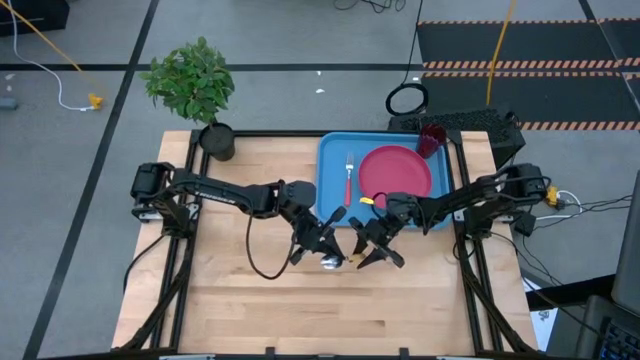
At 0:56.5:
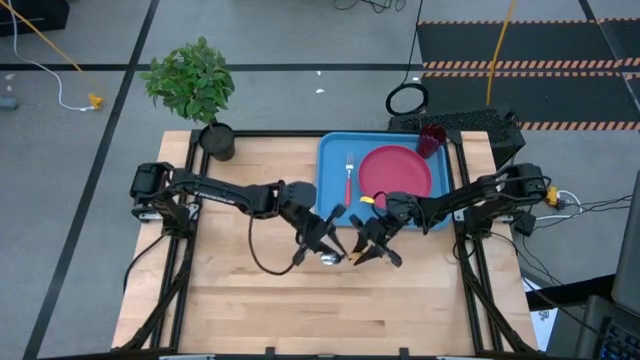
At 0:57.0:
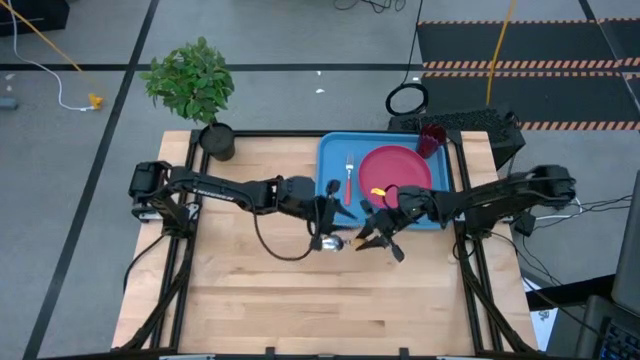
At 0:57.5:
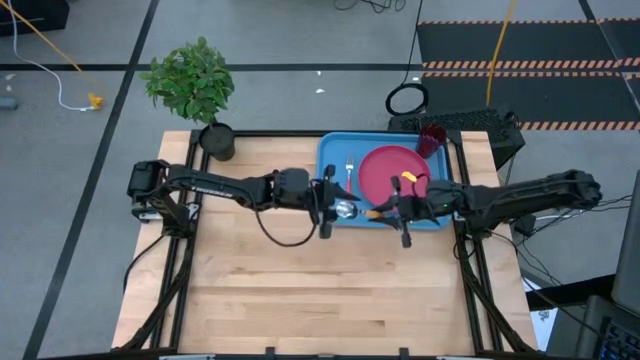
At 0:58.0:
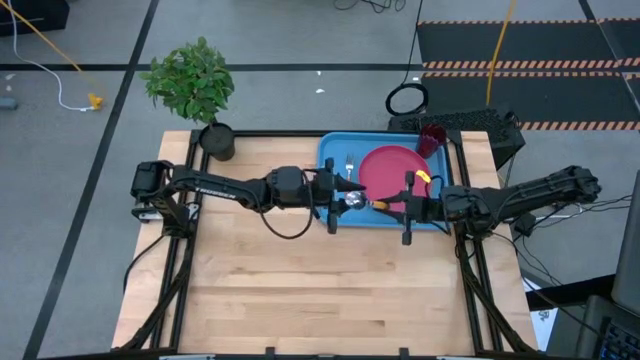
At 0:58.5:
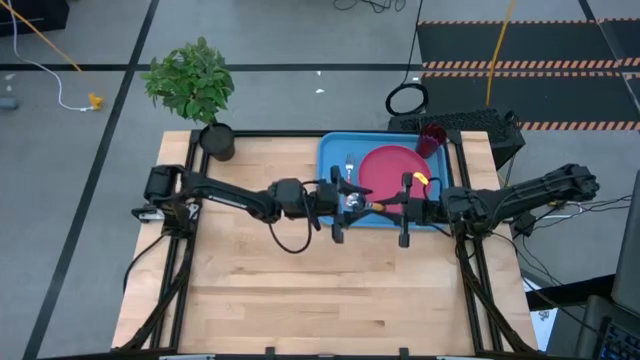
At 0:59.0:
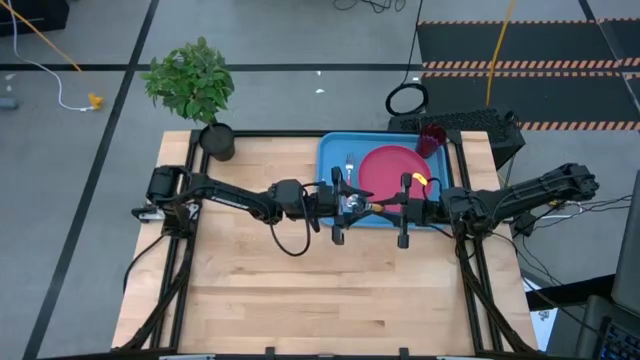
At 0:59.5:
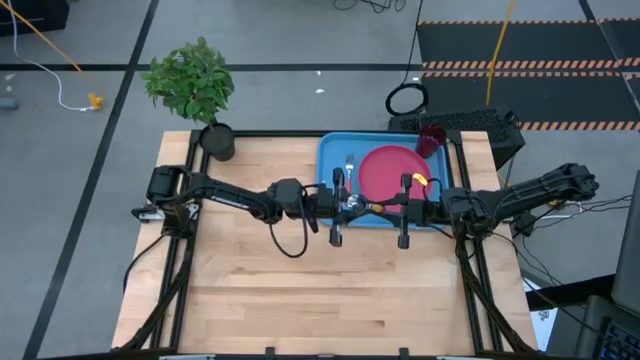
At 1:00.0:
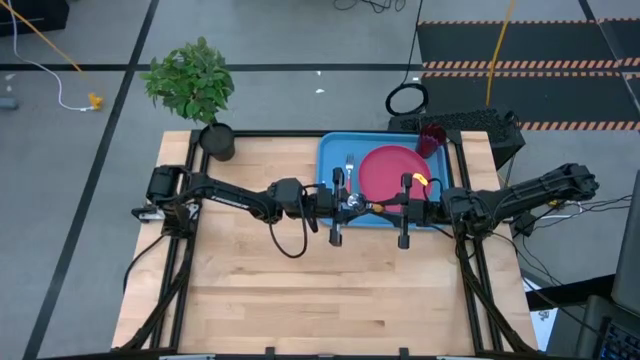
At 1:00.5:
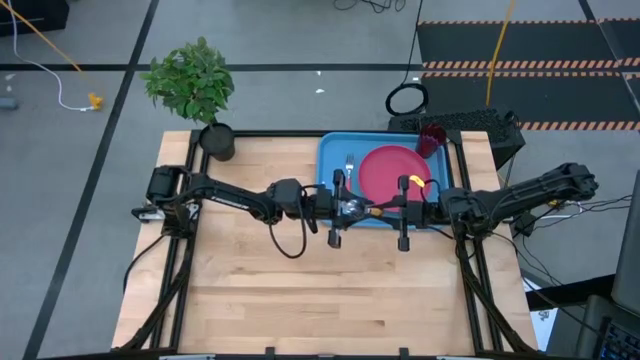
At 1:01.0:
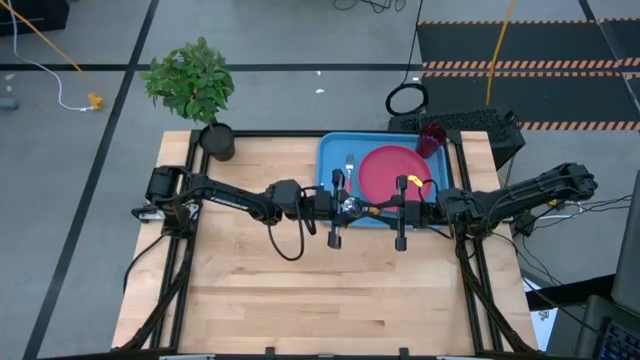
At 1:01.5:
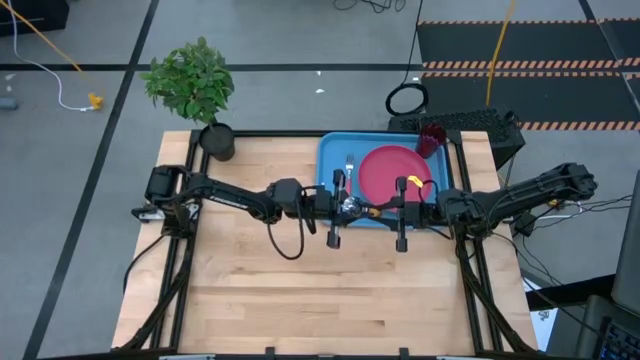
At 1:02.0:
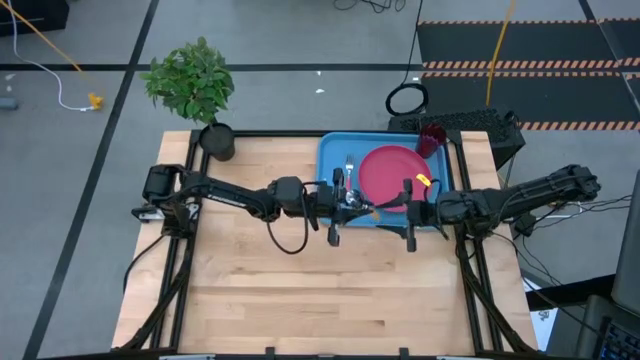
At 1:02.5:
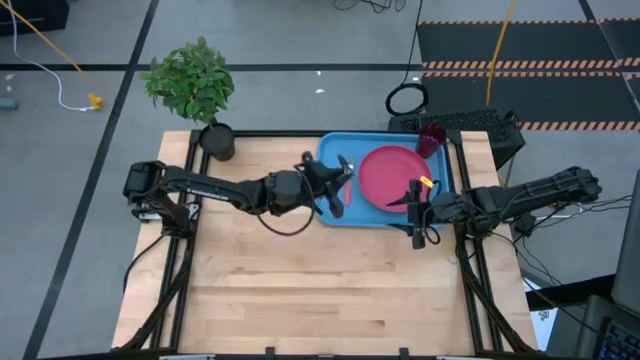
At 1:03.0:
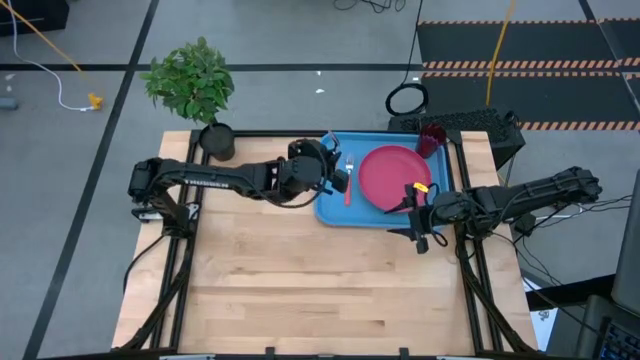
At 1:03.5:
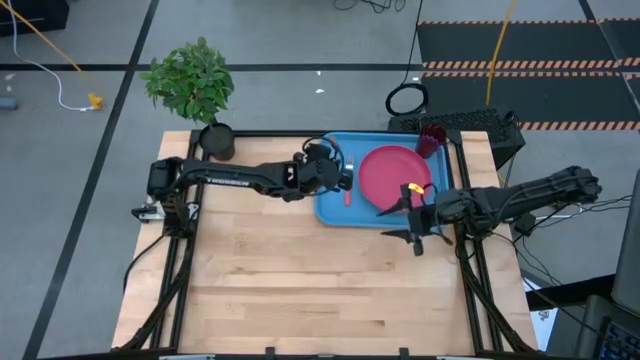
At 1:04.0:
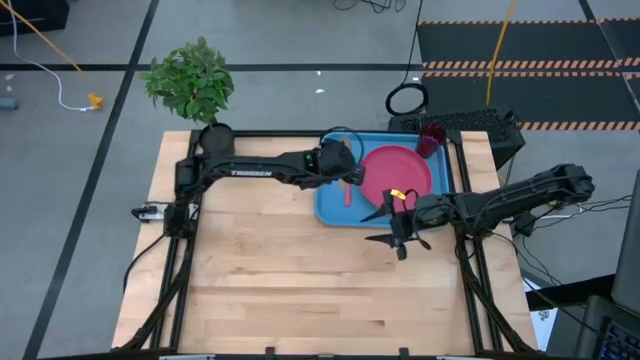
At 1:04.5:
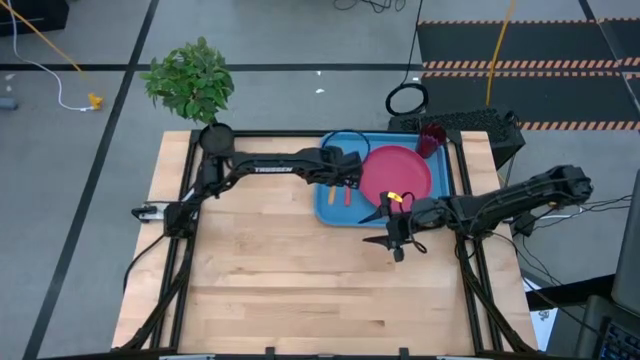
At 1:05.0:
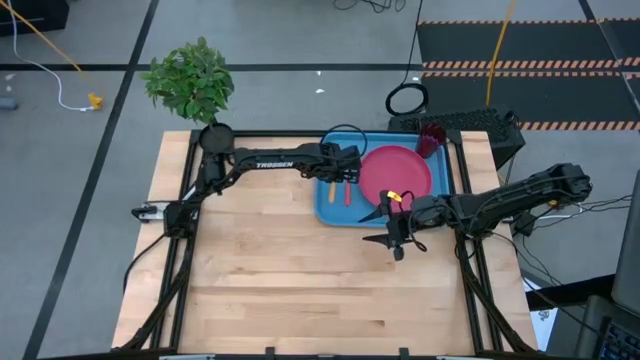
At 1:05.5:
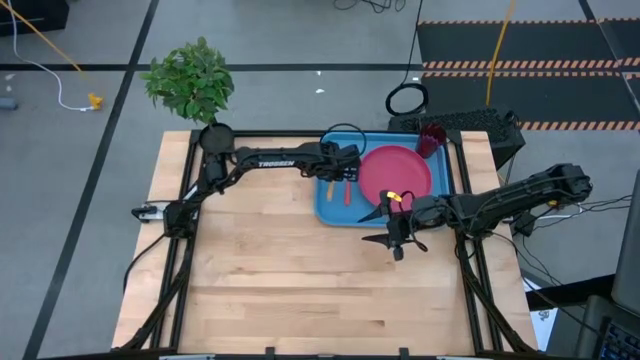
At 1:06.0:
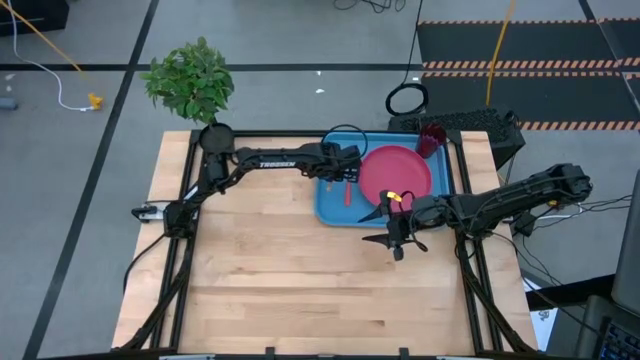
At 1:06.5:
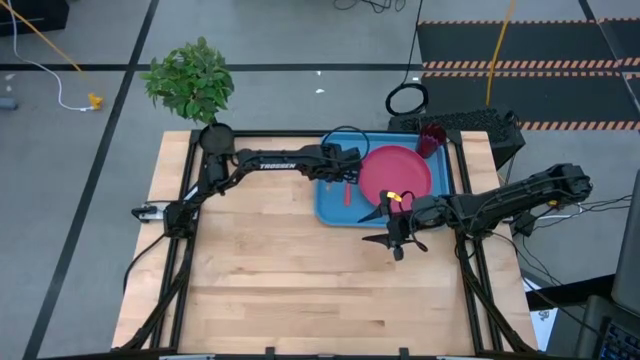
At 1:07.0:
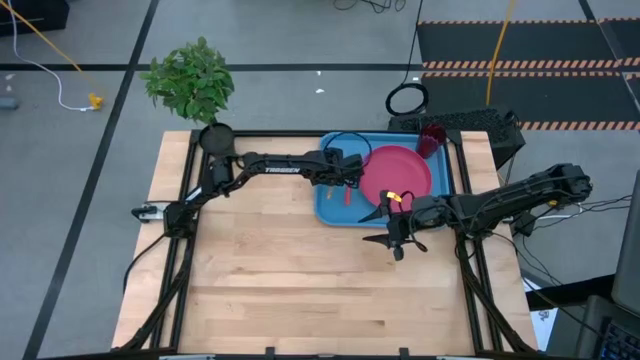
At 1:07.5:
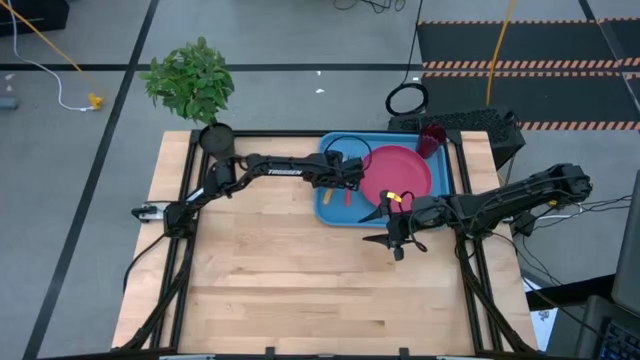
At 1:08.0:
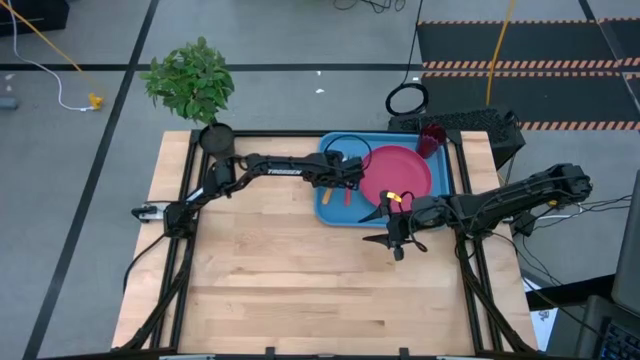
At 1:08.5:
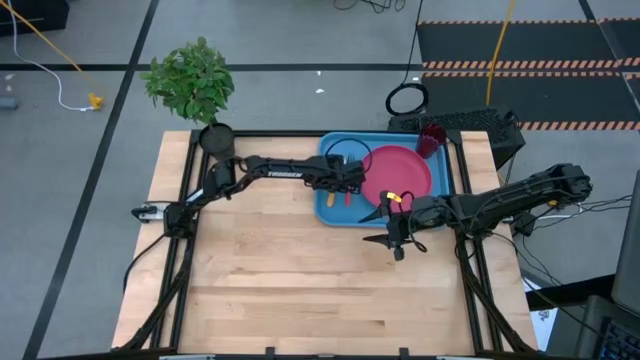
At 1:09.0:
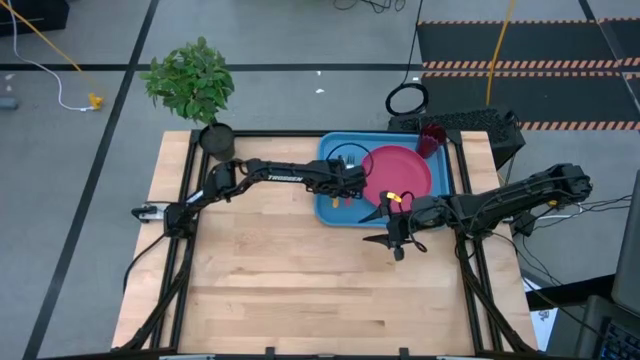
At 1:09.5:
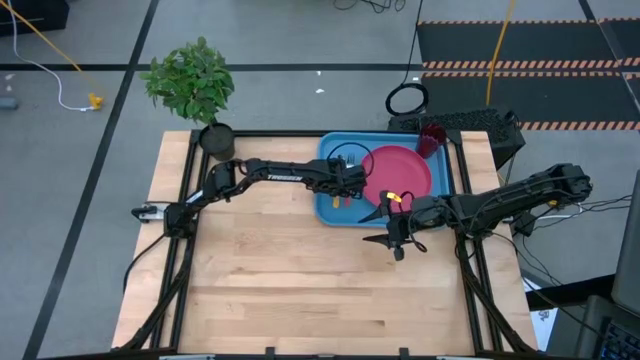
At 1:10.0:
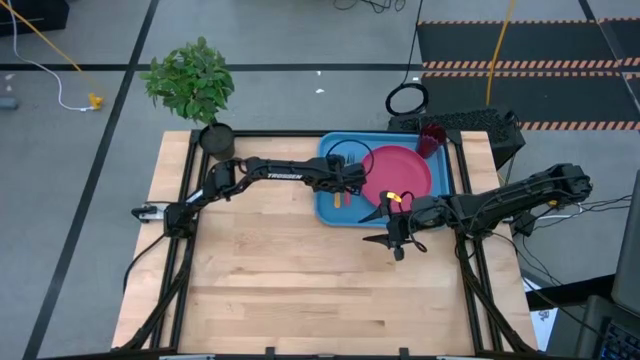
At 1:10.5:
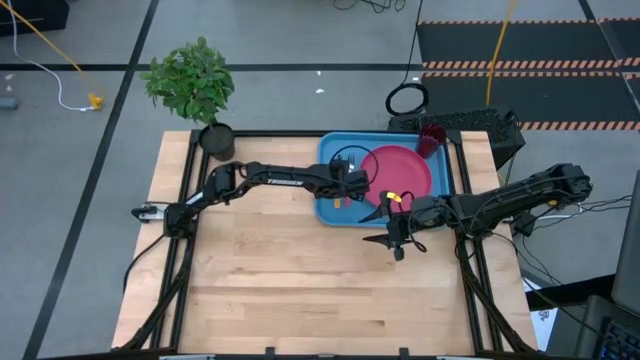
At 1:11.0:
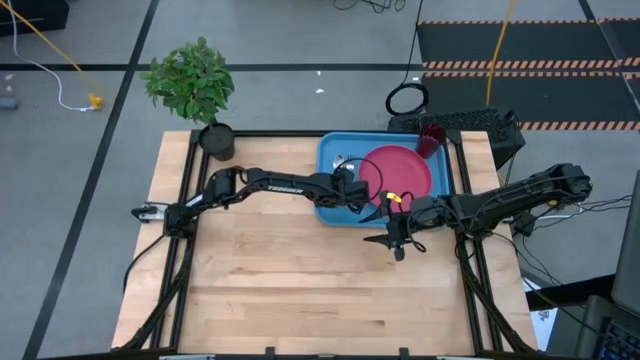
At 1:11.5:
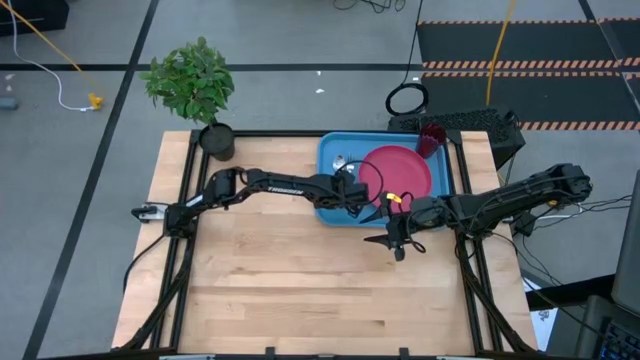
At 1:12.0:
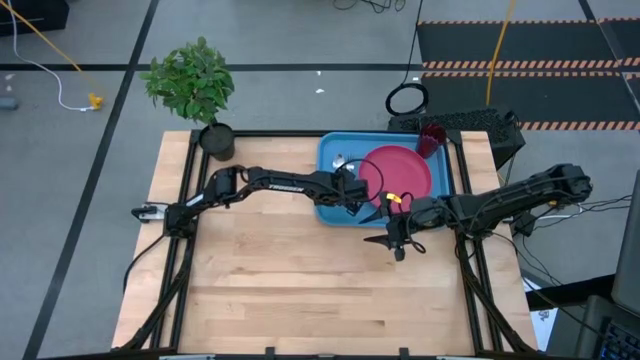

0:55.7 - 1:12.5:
Task: Pick and place plate/cup/fork/spoon on tray
Put the yellow spoon on the blue tray to the left of the pink fork

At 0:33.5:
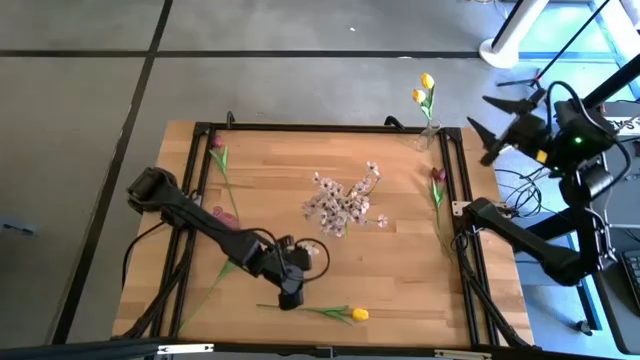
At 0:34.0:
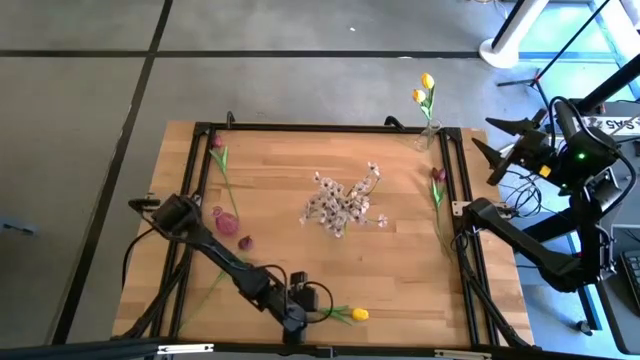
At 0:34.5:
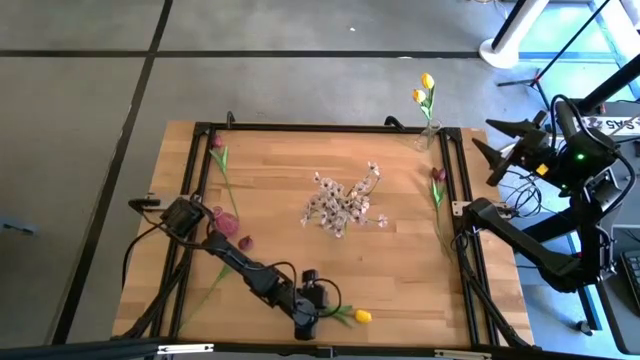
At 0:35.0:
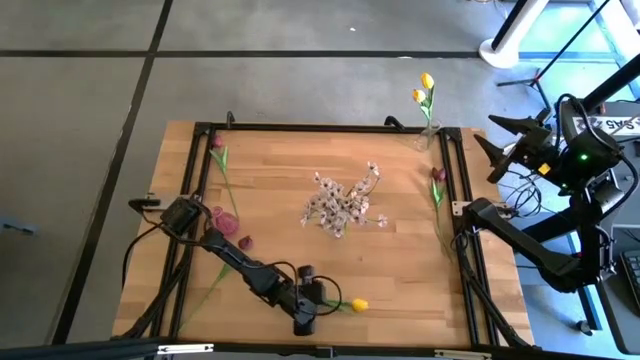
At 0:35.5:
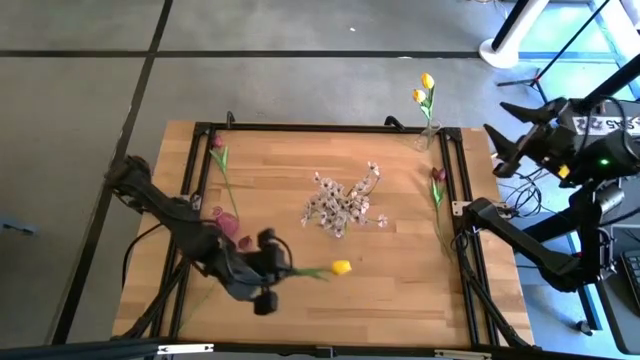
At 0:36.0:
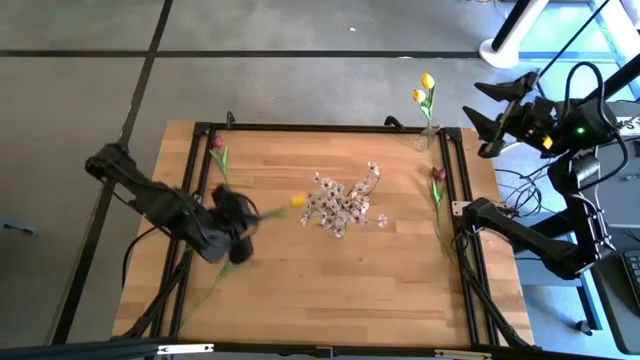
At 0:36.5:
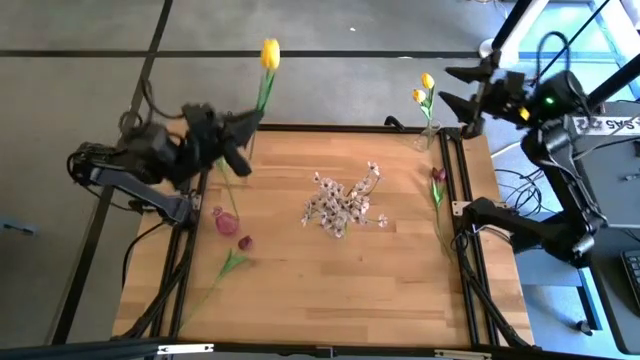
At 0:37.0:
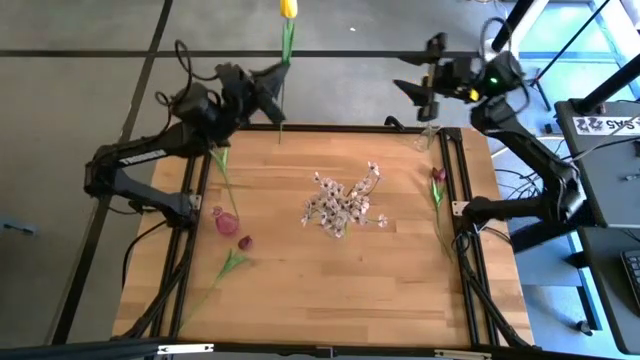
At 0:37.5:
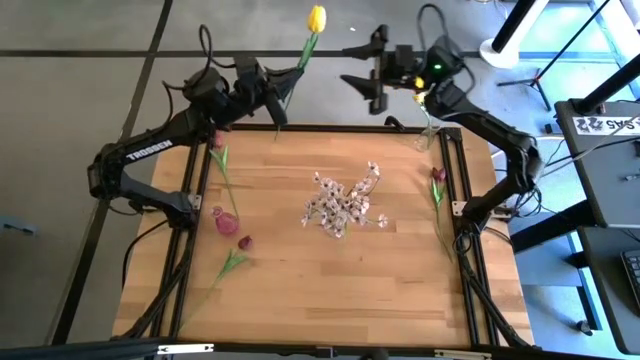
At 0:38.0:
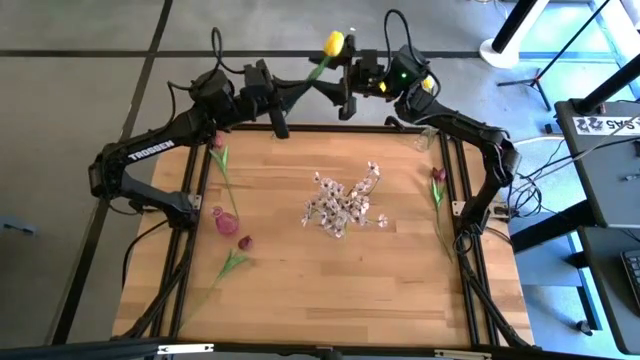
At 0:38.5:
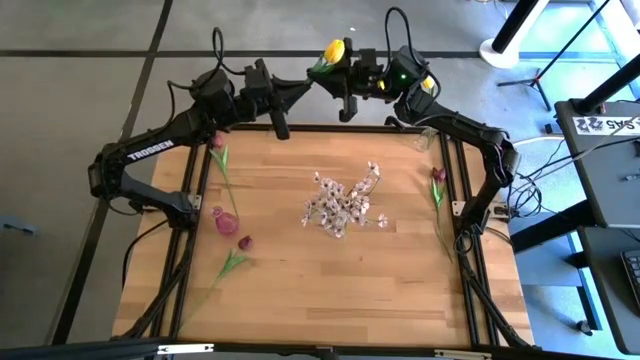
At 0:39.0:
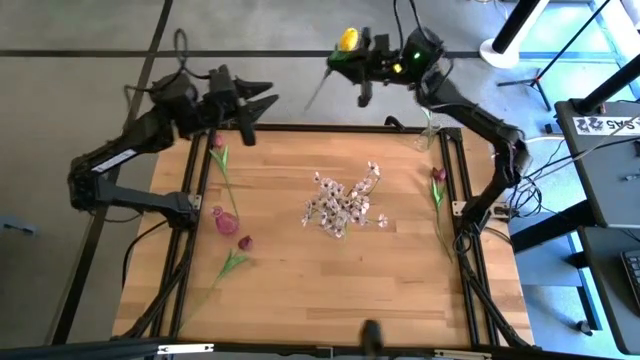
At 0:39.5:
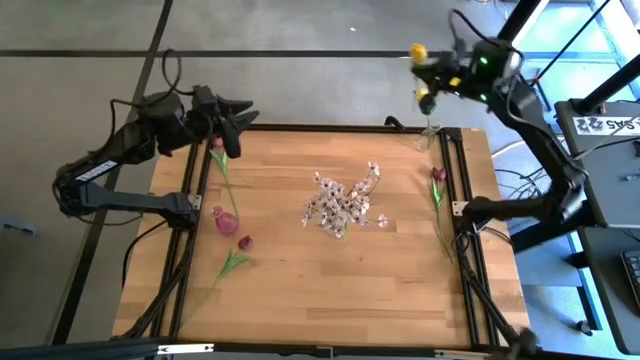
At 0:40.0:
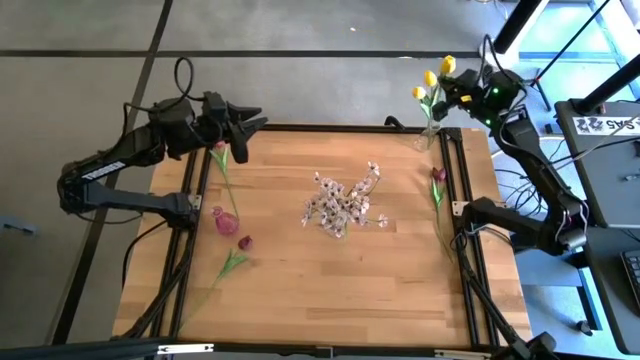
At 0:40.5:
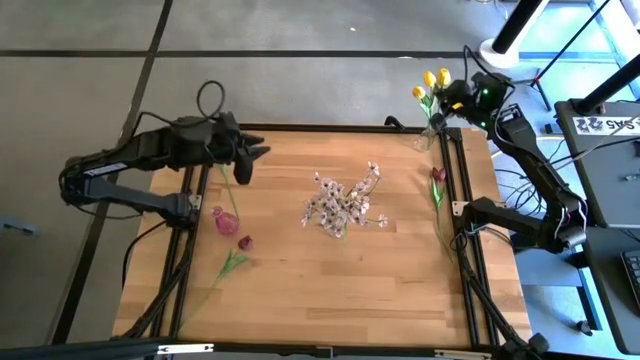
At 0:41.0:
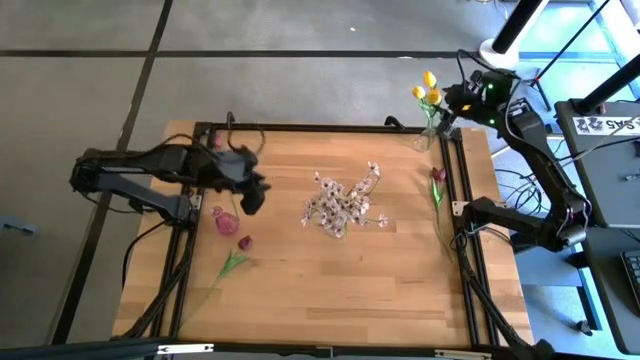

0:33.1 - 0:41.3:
Task: Sort flowers into vase by color
Put the yellow tulip into the top transparent vase
